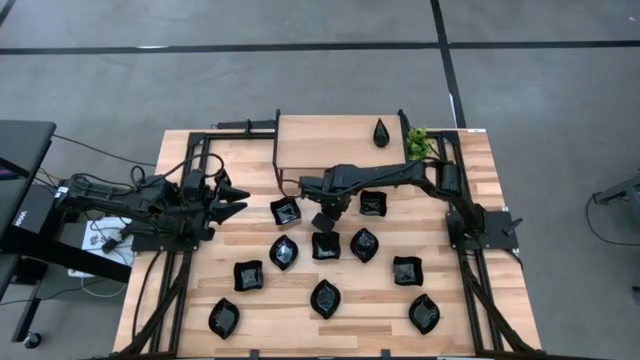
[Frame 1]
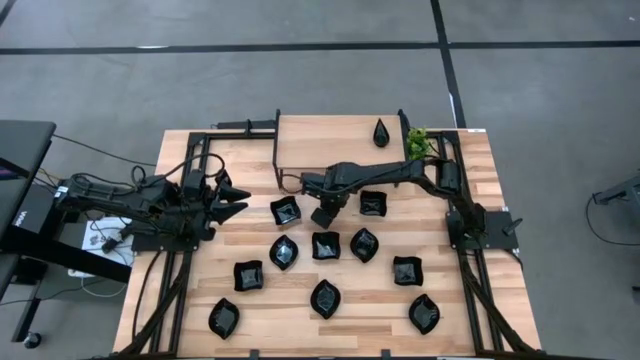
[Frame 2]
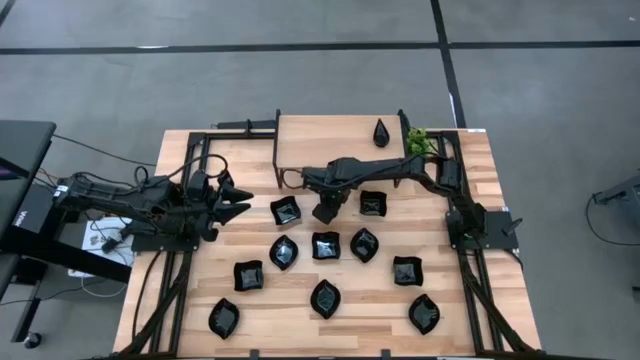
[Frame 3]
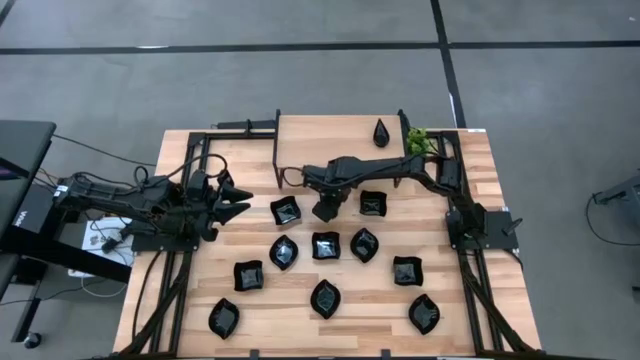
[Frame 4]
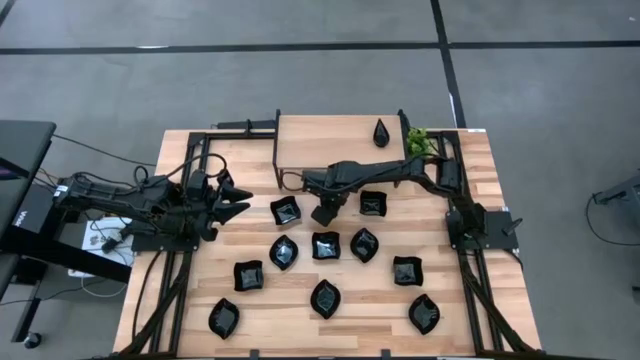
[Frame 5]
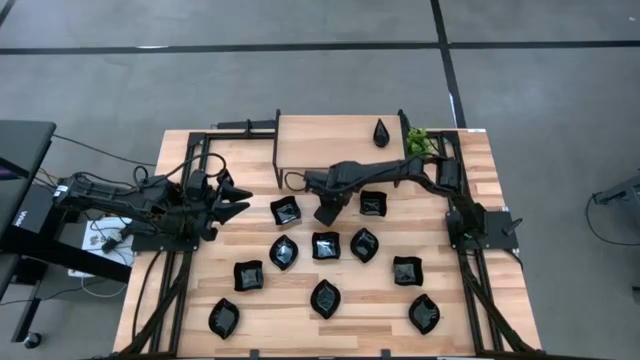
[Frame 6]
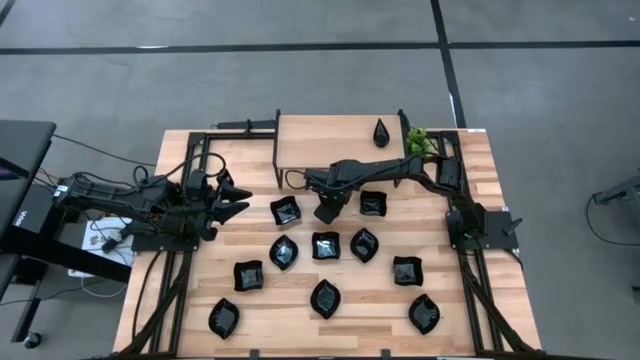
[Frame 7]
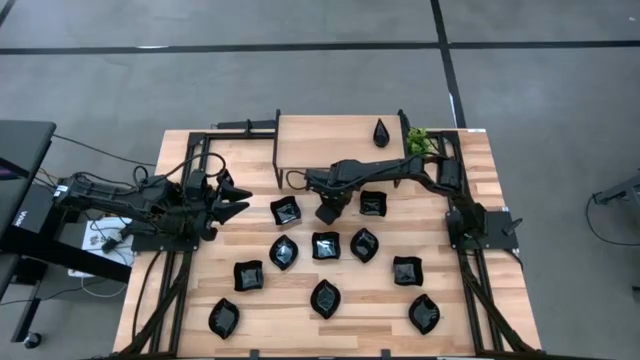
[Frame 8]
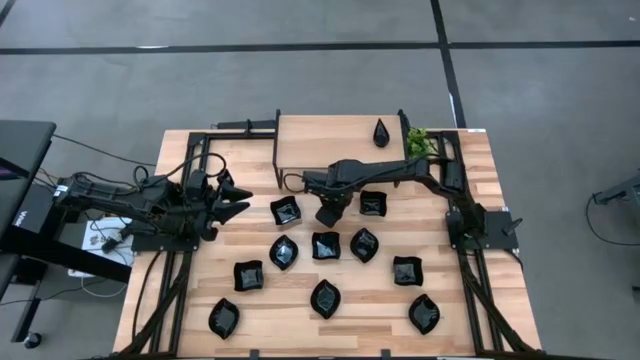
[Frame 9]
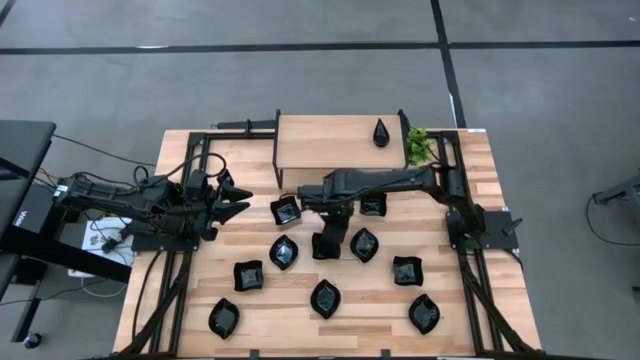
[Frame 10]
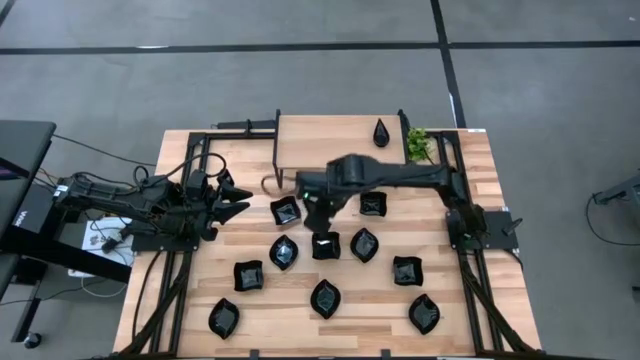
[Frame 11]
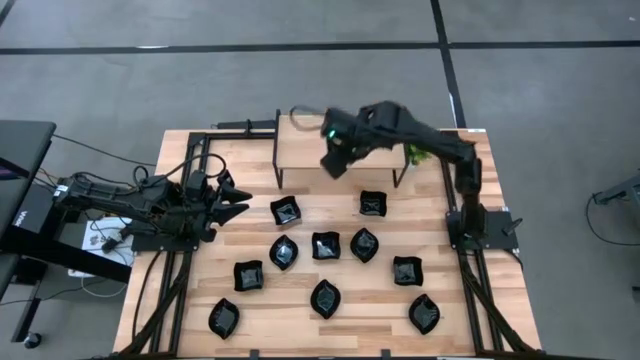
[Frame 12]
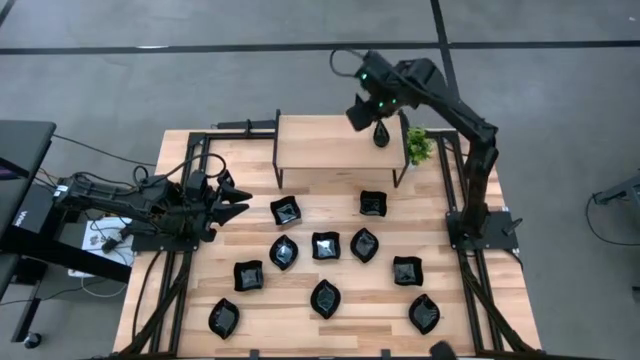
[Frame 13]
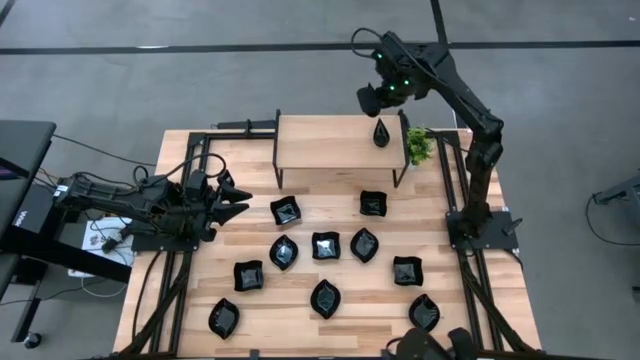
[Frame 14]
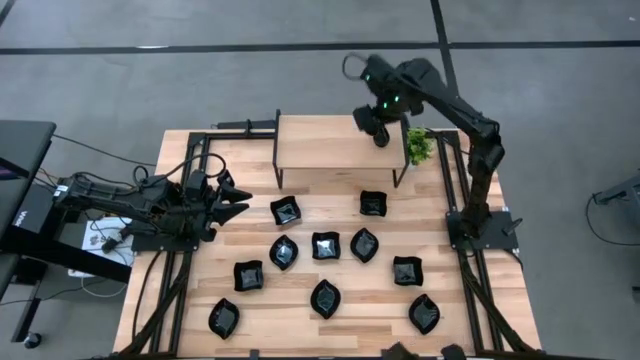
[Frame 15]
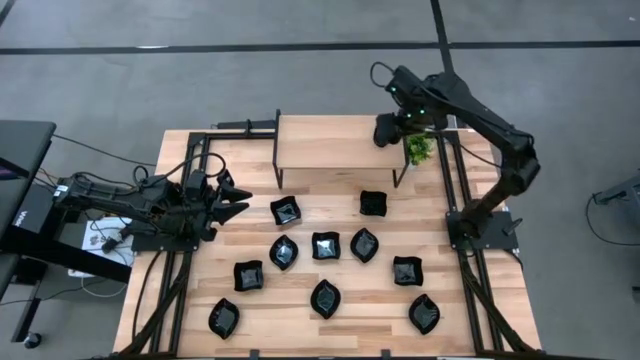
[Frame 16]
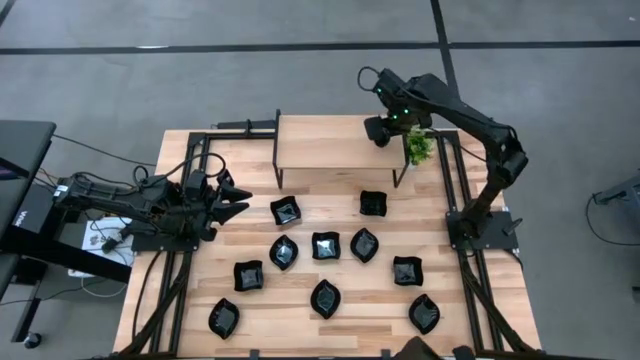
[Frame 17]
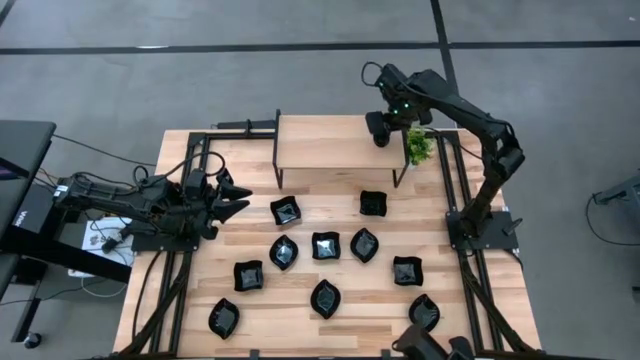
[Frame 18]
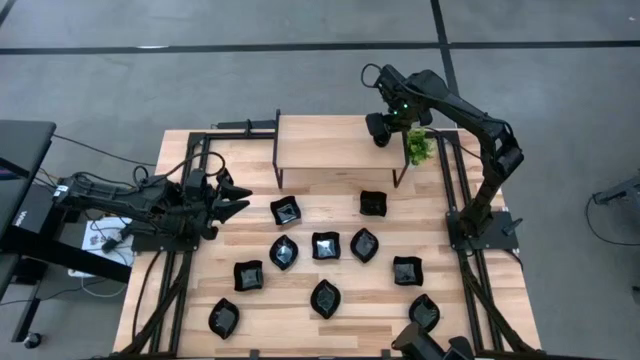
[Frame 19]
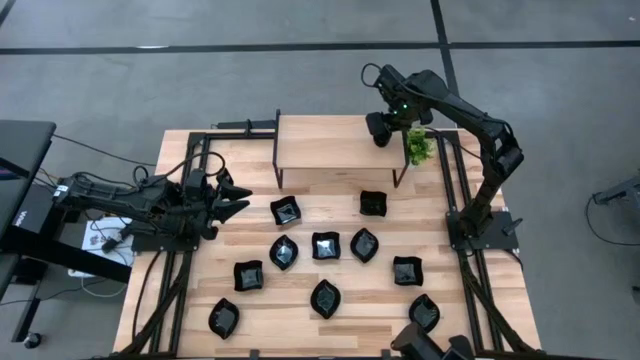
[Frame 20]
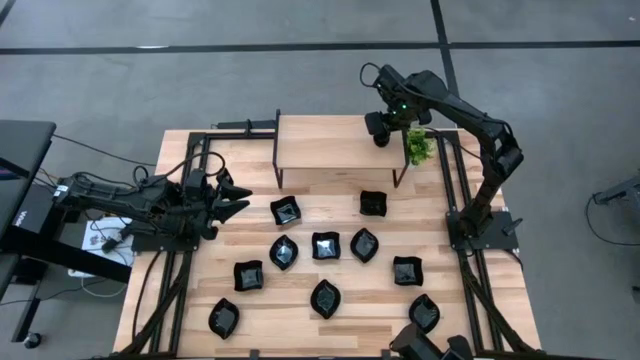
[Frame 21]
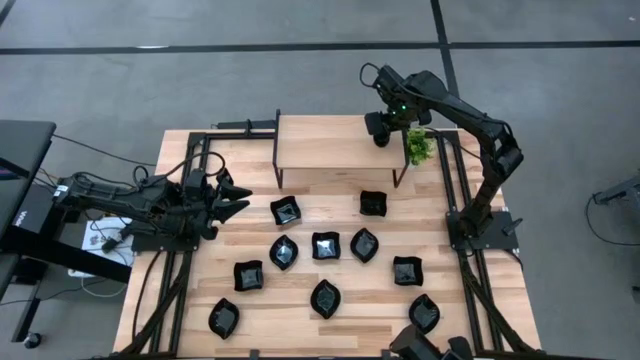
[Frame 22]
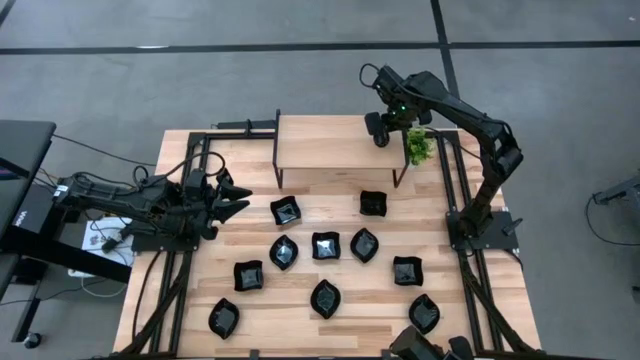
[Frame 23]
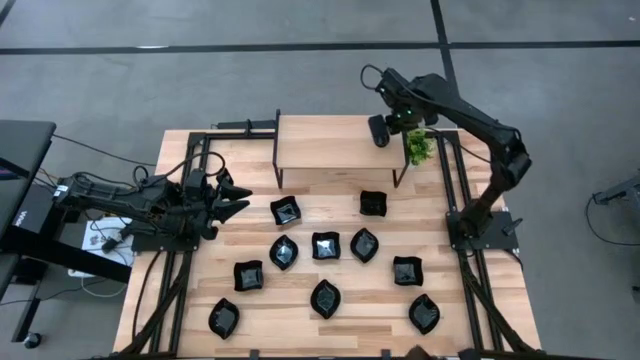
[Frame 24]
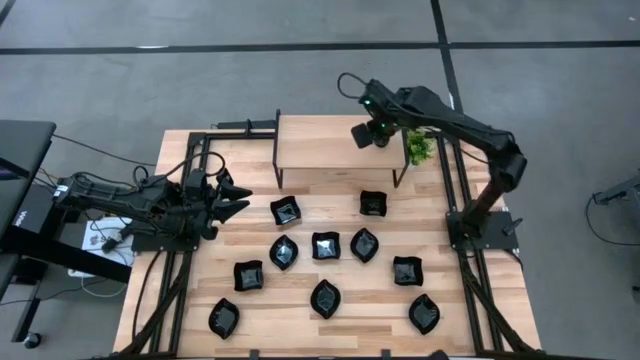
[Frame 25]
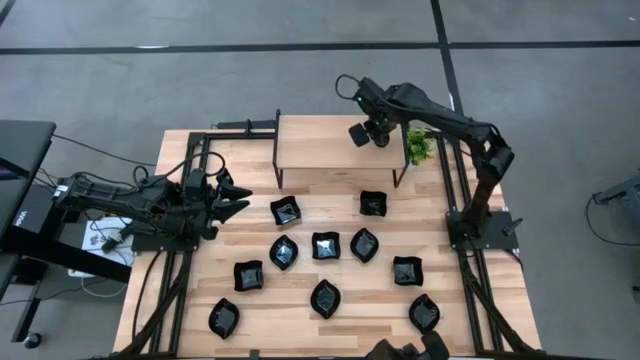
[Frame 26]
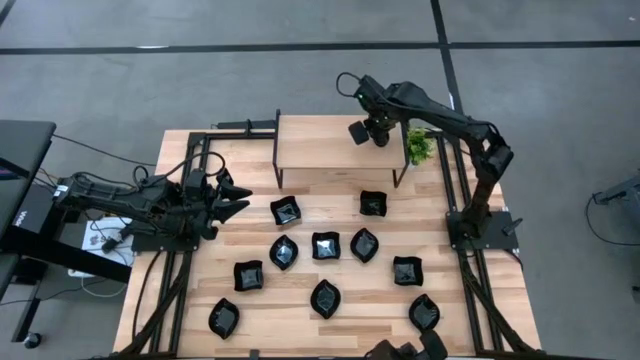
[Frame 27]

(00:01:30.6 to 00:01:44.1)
Task: Pick & Place Mini shaped plates
Stack the drop-shaped plate on top of the drop-shaped plates on the shelf

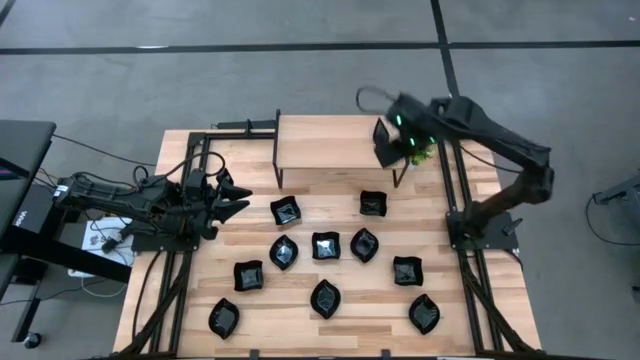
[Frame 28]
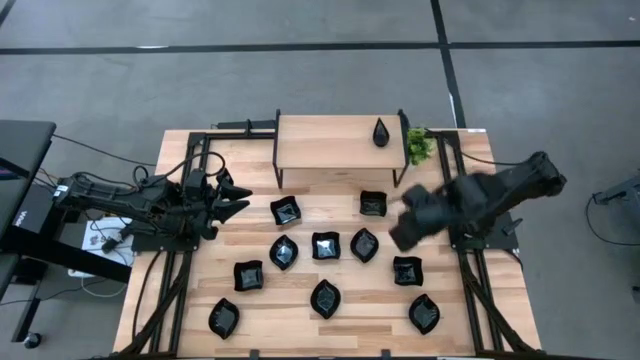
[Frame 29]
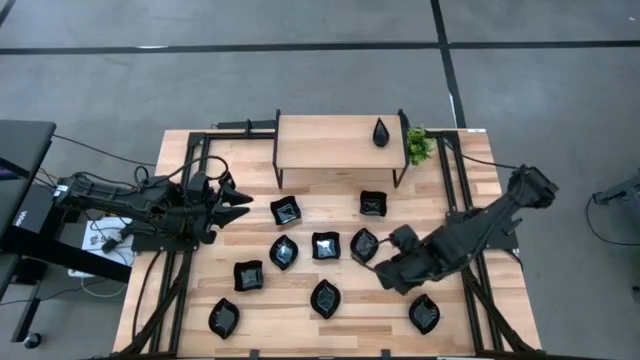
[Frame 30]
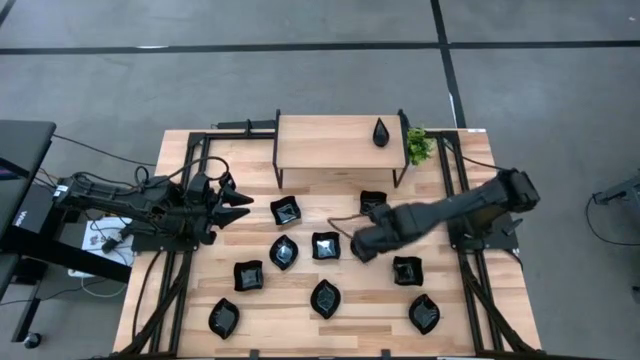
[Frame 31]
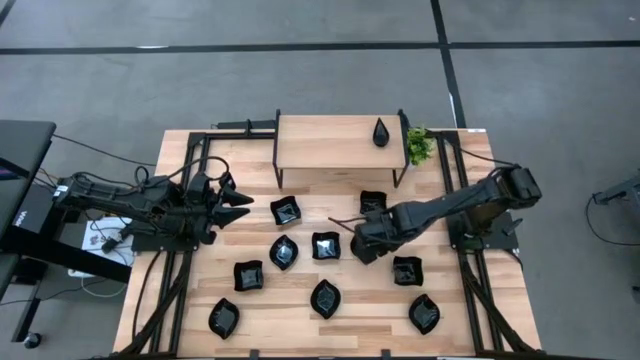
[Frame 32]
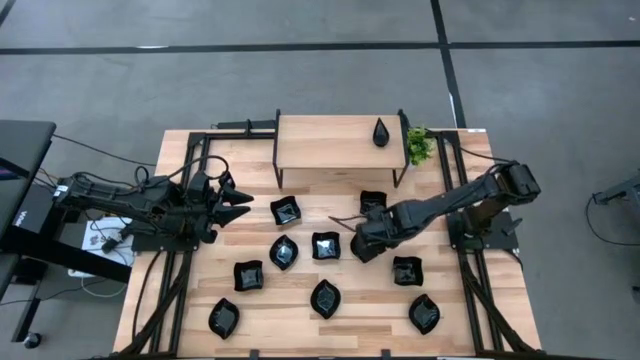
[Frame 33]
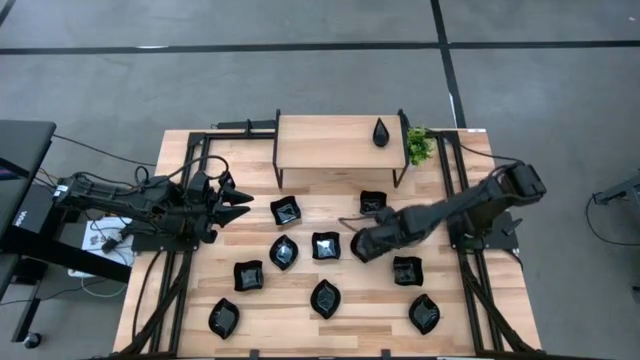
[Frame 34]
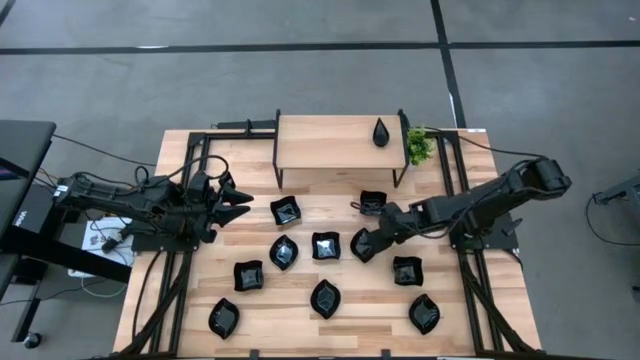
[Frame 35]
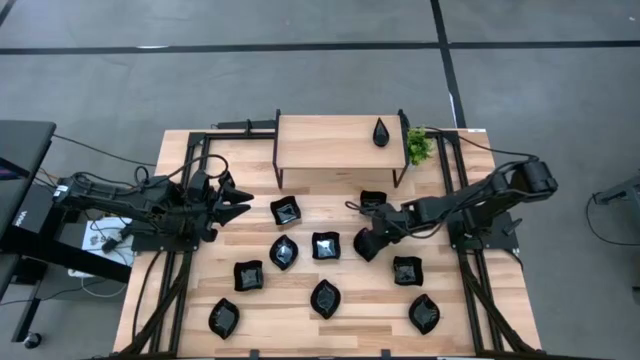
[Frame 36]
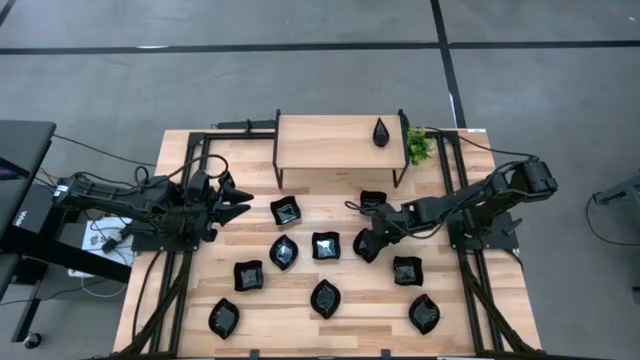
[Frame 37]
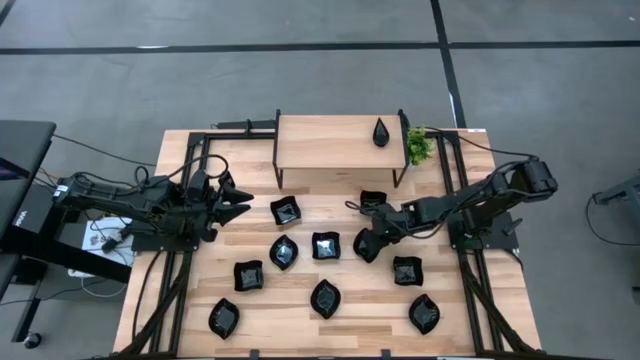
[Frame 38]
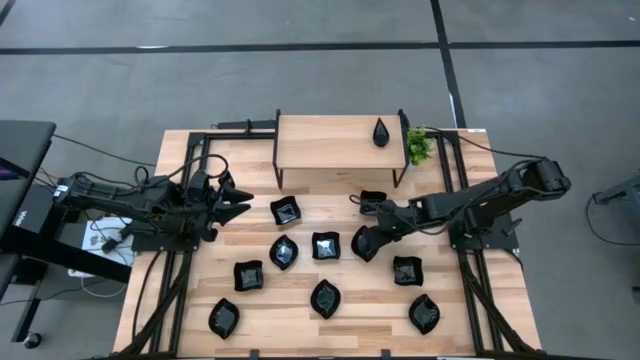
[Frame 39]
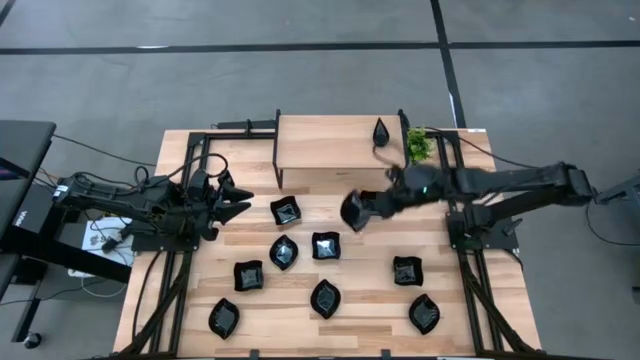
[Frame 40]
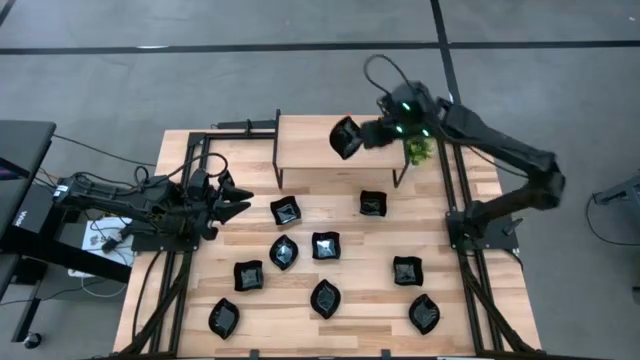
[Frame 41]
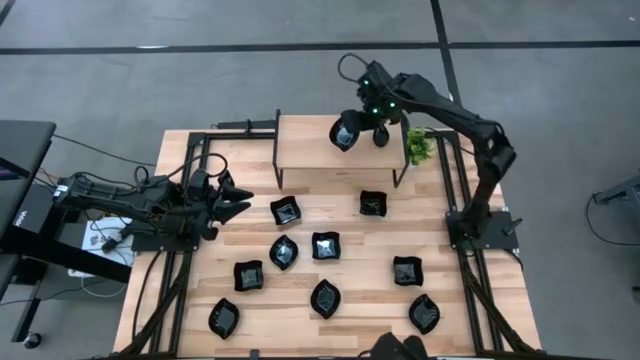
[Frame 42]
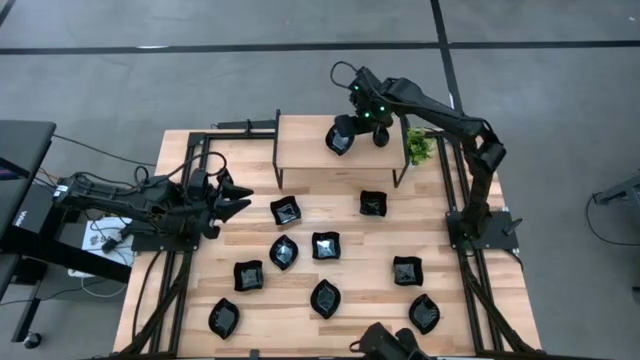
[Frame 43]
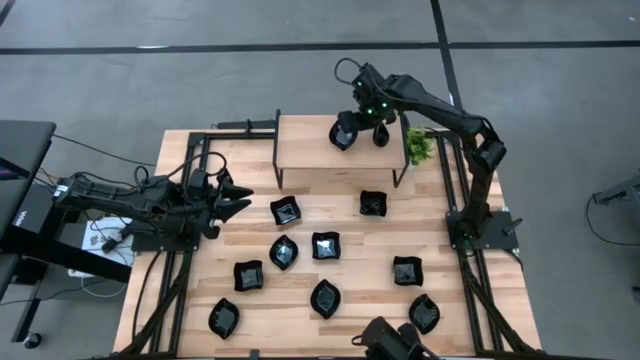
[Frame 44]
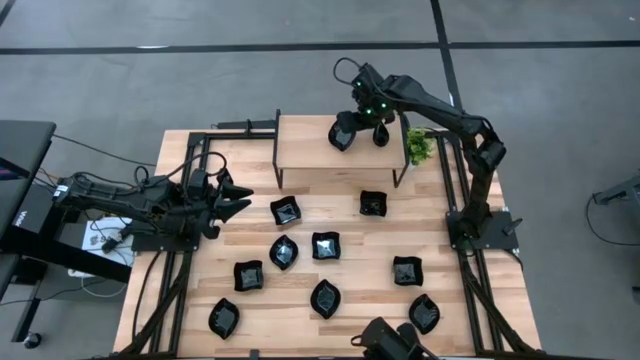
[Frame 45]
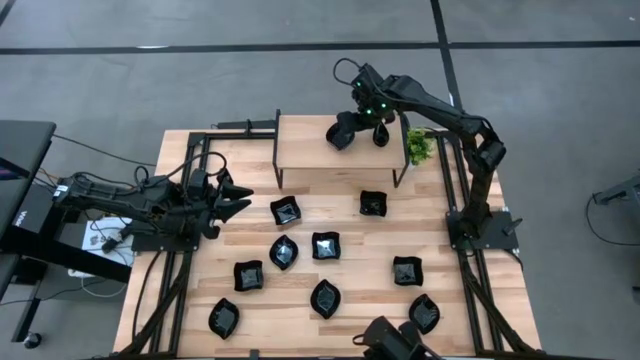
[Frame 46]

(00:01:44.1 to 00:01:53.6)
Put the leaf-shaped plate on top of the shelf
